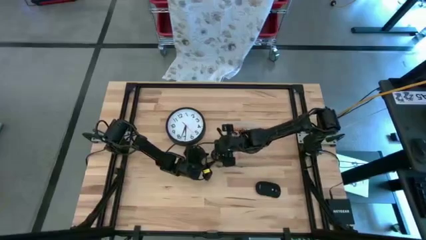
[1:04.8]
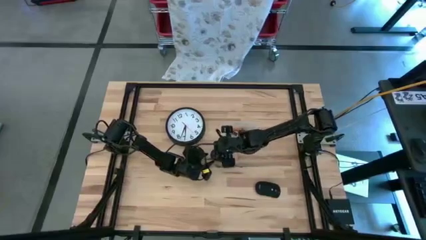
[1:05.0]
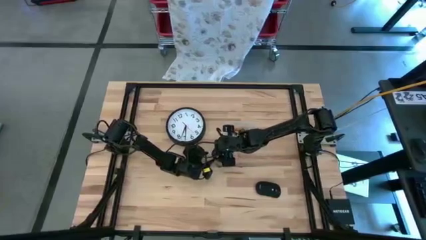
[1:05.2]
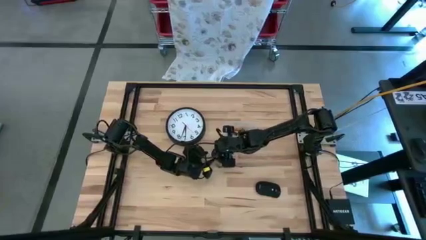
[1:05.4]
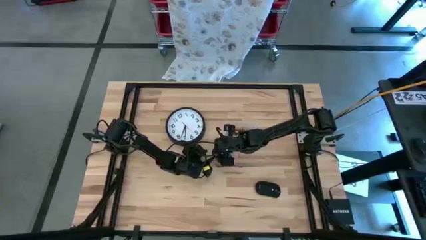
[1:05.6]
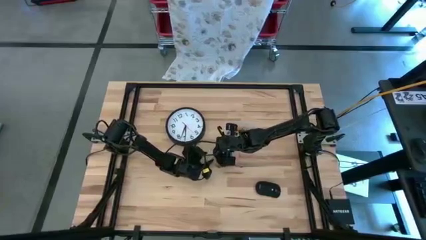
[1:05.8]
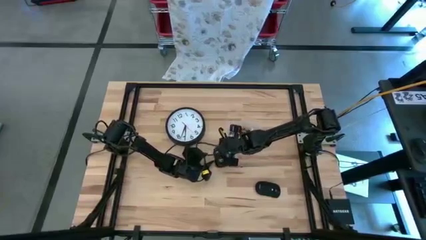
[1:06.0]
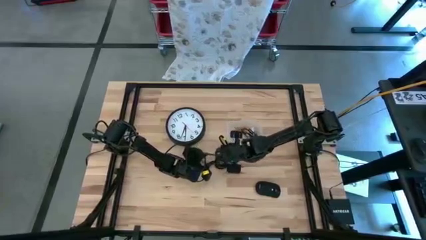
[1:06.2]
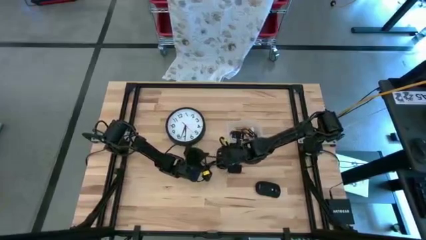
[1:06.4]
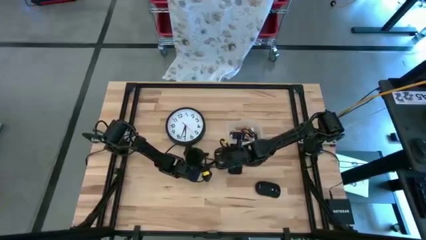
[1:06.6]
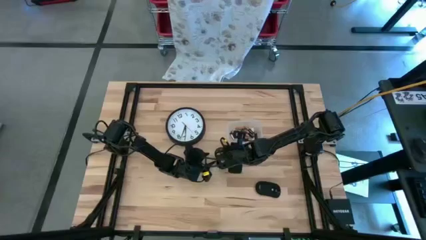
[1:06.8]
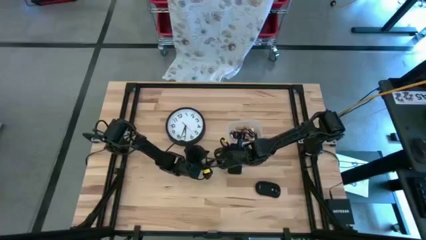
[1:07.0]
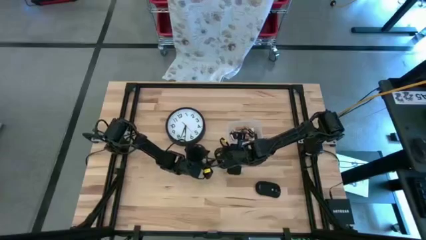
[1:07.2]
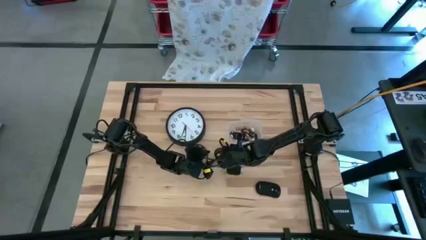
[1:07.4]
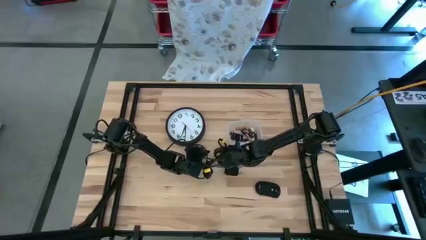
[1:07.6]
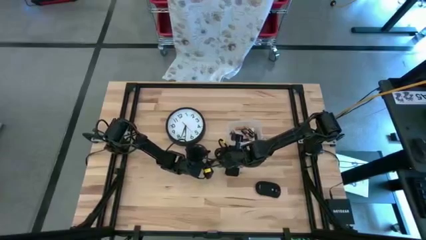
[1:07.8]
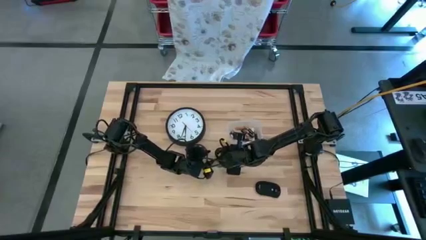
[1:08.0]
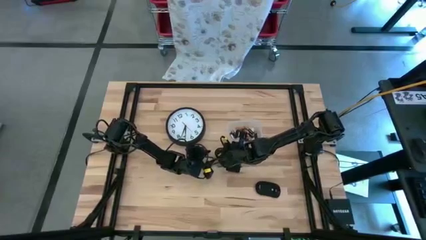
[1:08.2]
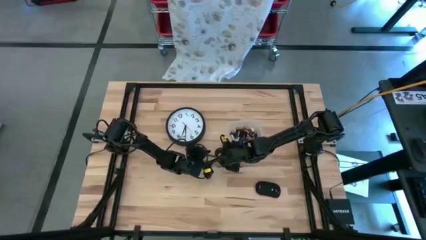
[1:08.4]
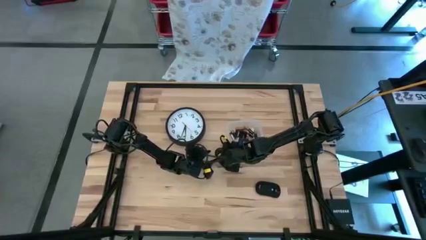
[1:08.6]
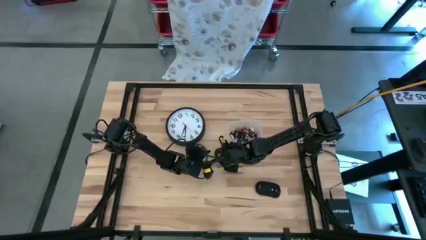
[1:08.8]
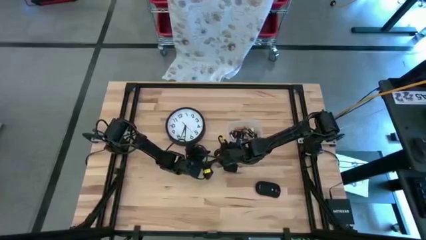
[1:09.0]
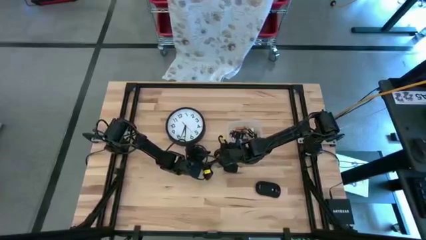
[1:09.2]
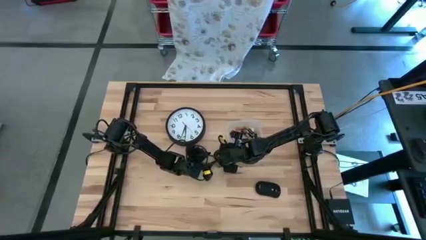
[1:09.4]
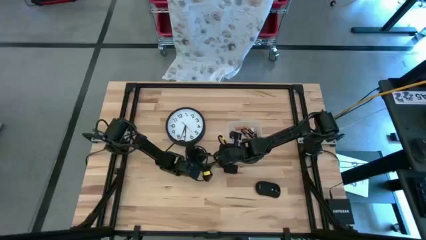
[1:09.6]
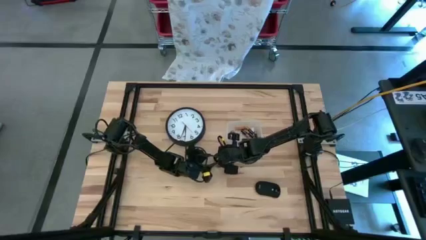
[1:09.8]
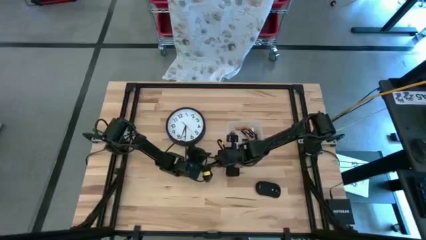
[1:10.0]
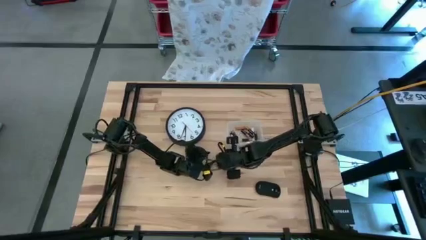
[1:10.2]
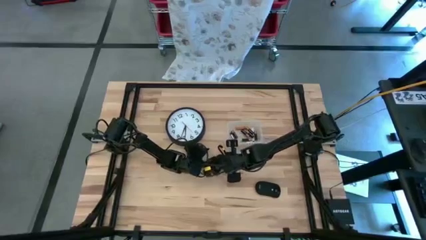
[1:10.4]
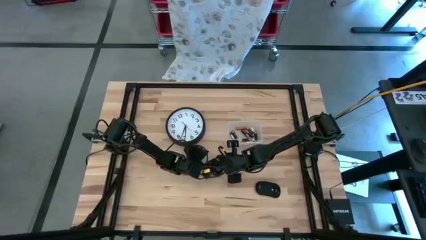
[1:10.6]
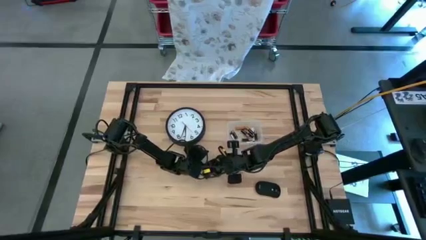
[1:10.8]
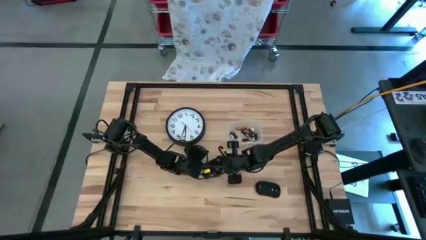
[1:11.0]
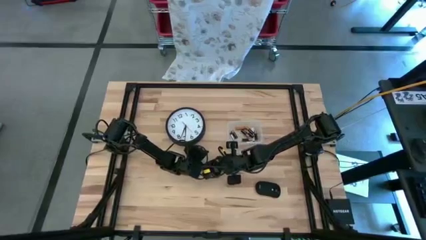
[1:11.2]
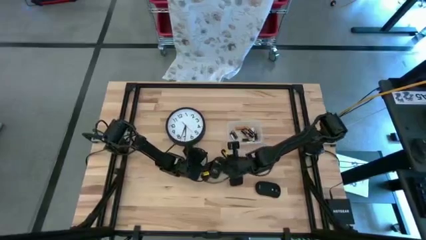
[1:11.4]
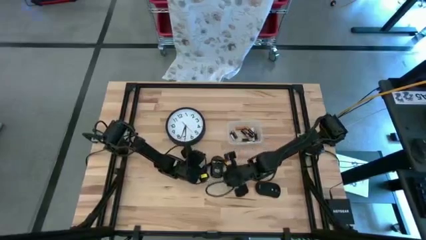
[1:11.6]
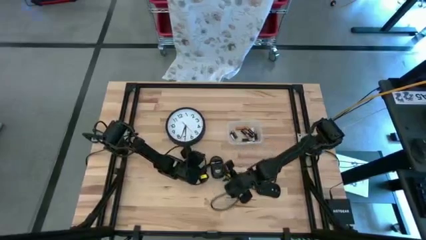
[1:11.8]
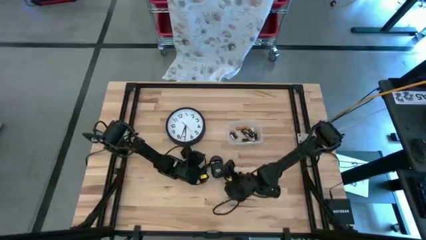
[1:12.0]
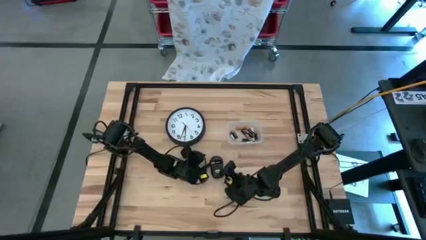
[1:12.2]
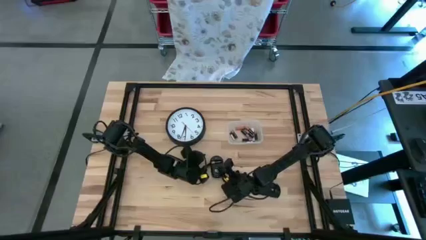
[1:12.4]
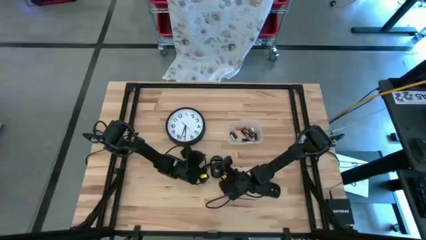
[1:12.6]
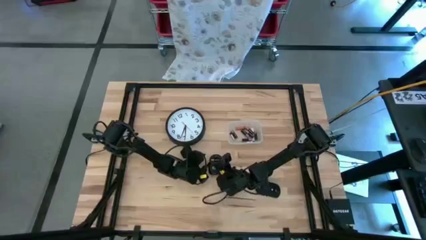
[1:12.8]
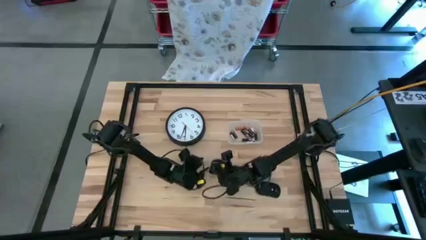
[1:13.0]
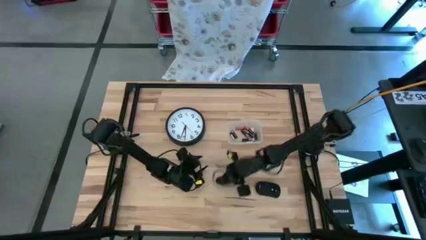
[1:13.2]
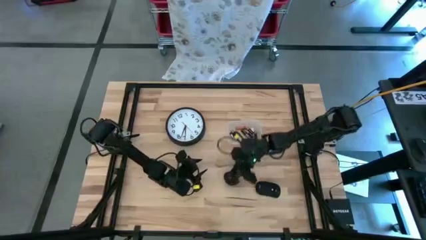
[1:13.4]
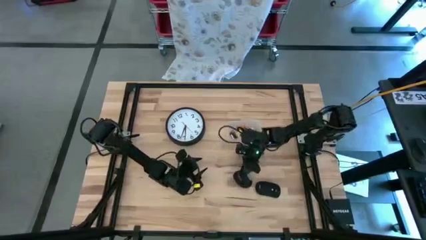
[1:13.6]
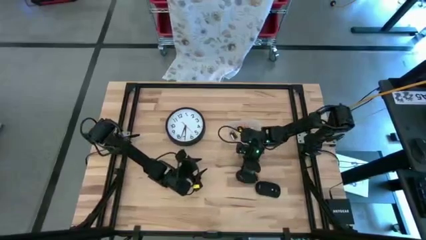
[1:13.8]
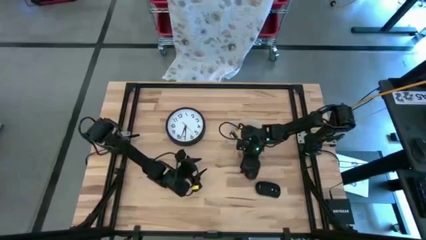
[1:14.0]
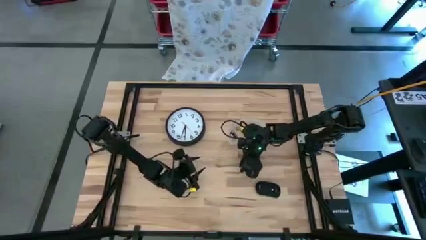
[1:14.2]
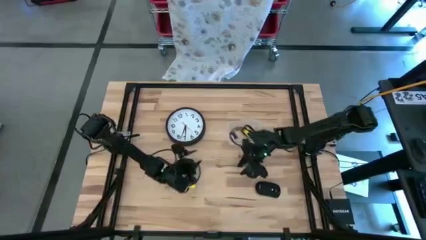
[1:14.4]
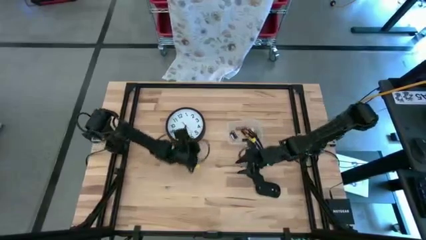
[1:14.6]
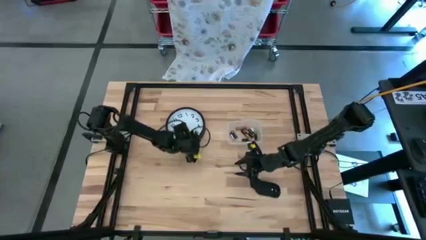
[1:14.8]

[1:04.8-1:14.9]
Task: Insert battery
Insert the black battery into the right computer mouse

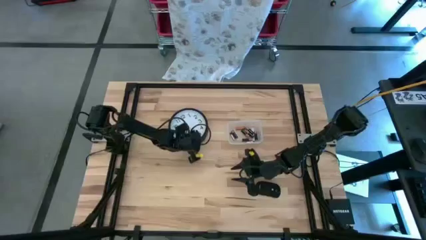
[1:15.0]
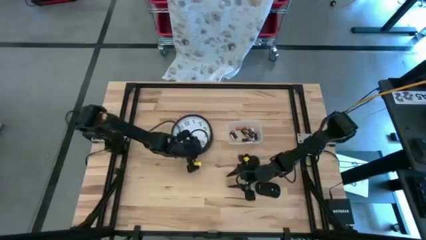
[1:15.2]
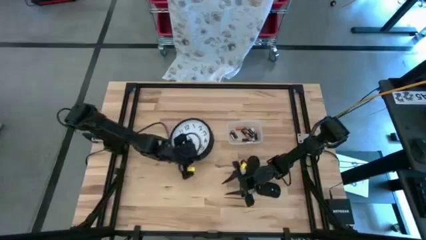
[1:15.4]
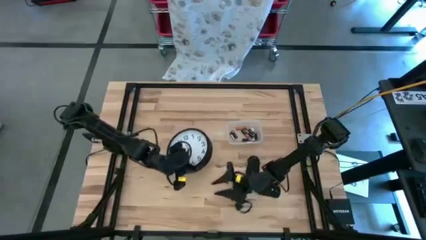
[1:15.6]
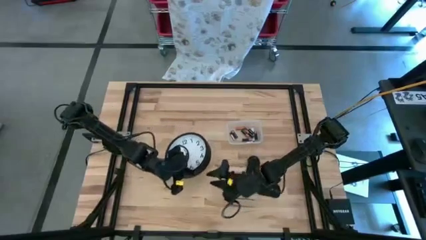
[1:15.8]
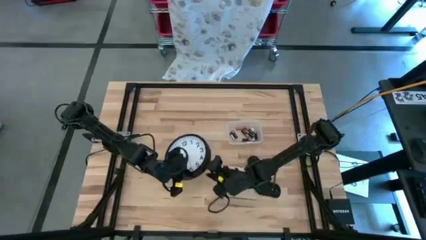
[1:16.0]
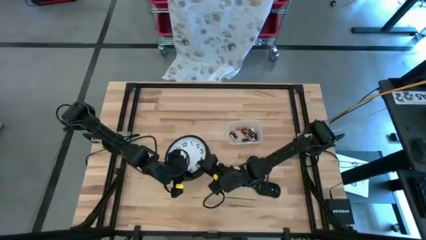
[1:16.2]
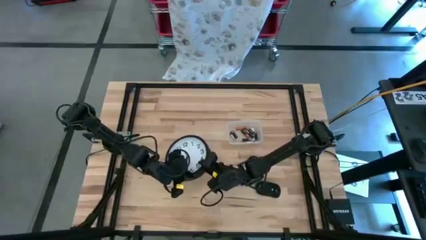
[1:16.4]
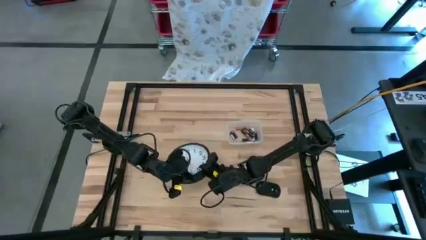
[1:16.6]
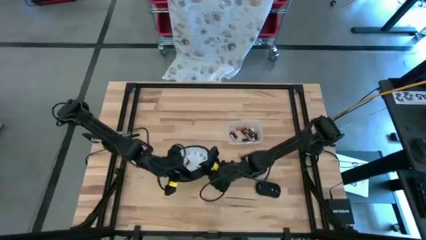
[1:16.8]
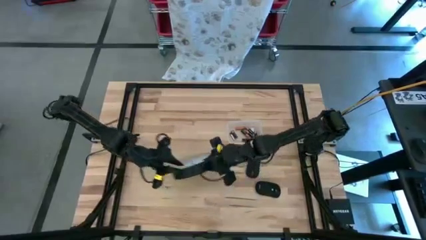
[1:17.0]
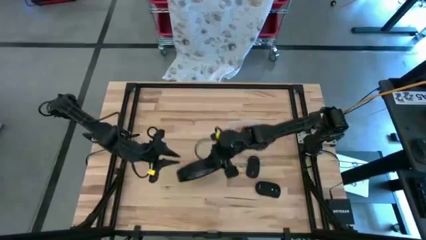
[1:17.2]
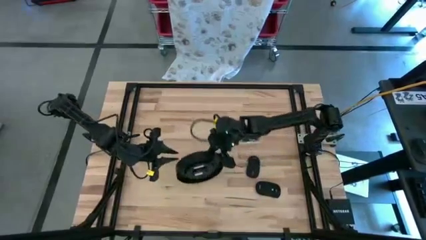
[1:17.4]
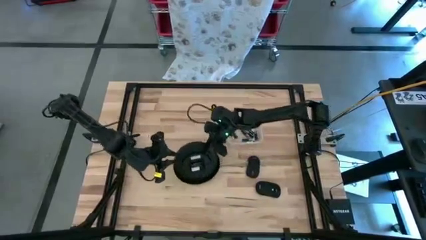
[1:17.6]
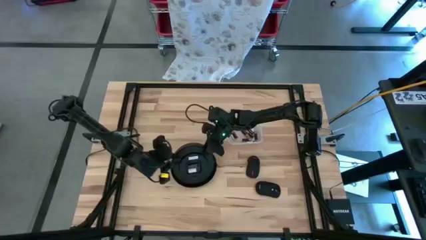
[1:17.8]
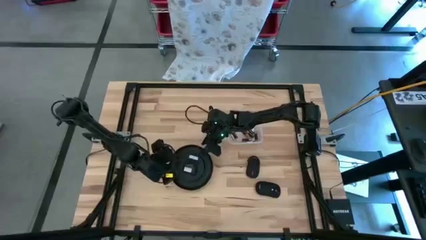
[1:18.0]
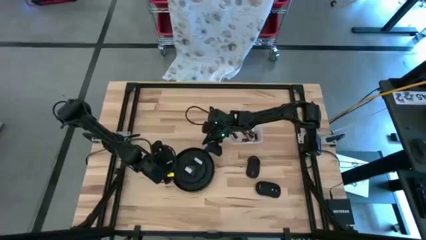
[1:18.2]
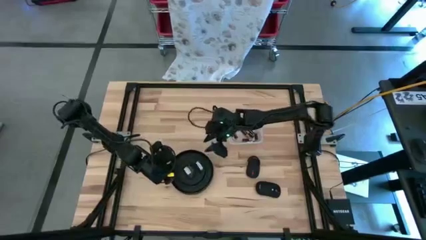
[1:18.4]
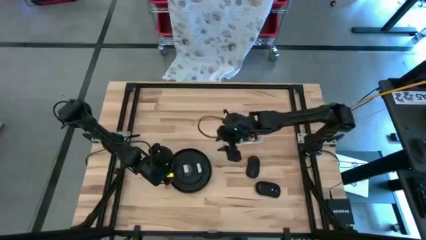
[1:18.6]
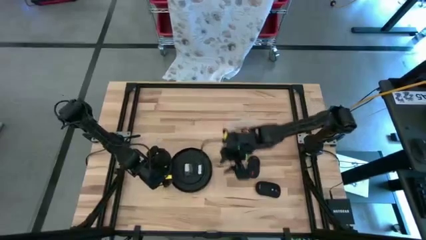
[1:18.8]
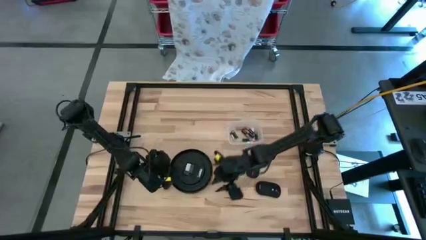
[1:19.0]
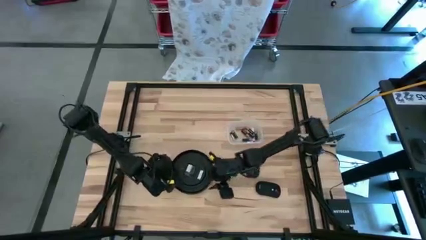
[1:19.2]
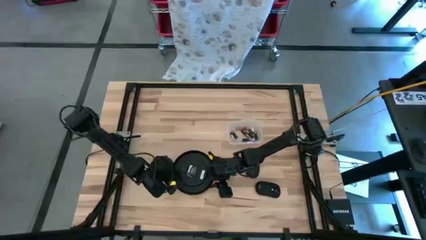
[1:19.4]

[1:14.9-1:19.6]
Prepare the wall clock for the battery insertion
